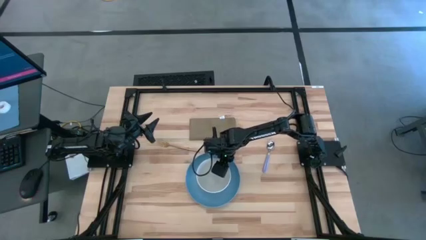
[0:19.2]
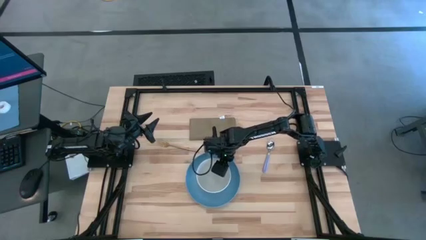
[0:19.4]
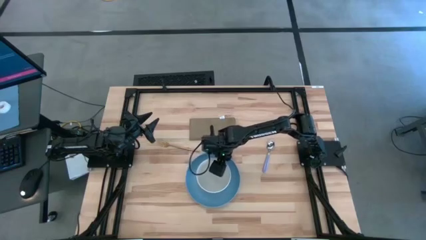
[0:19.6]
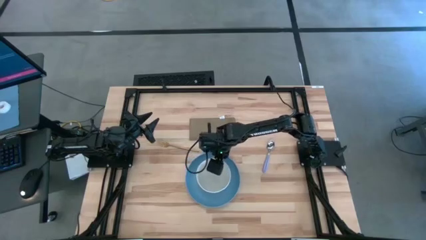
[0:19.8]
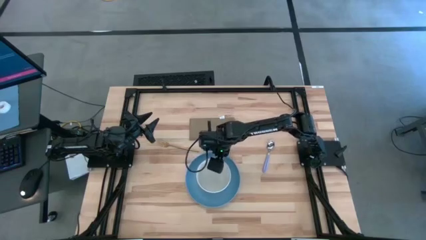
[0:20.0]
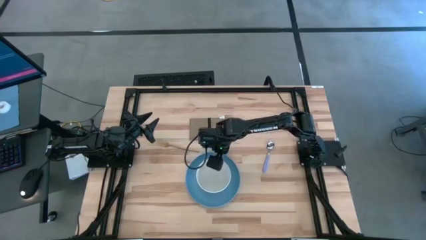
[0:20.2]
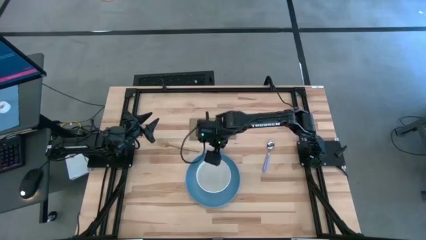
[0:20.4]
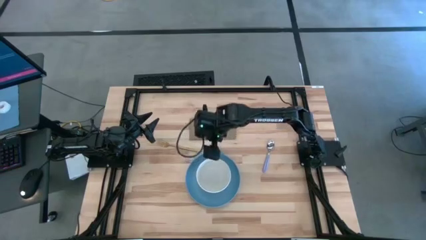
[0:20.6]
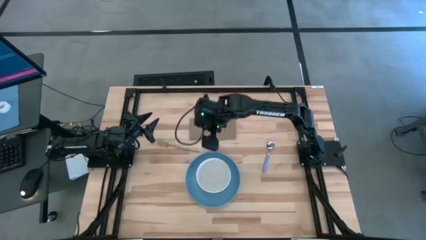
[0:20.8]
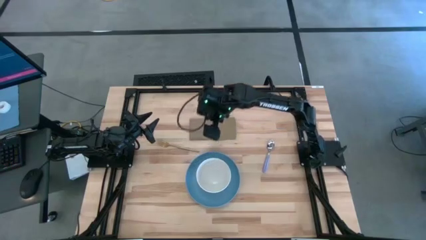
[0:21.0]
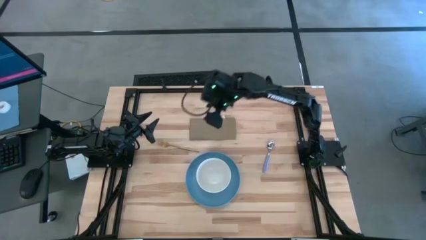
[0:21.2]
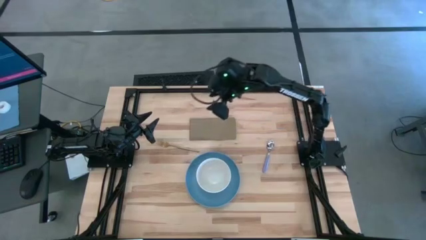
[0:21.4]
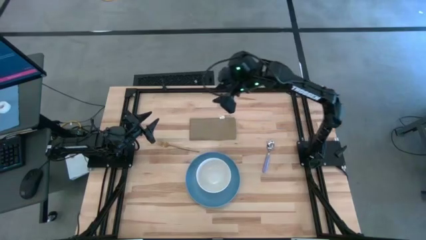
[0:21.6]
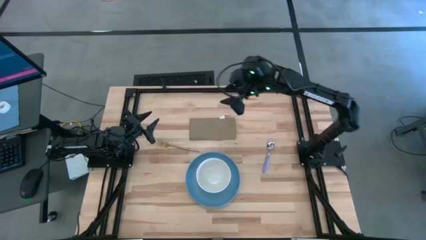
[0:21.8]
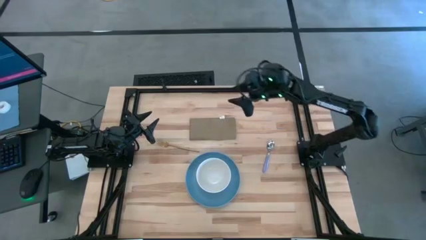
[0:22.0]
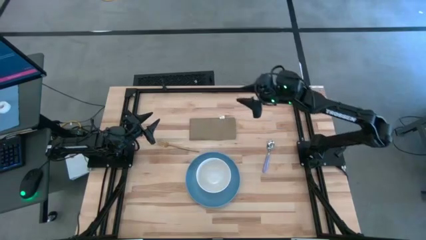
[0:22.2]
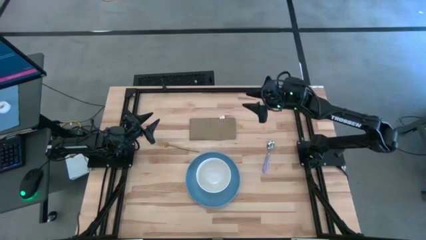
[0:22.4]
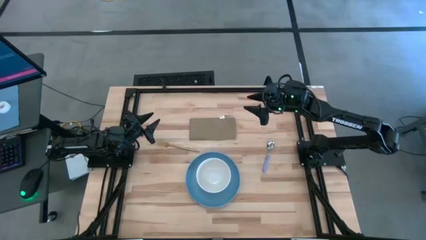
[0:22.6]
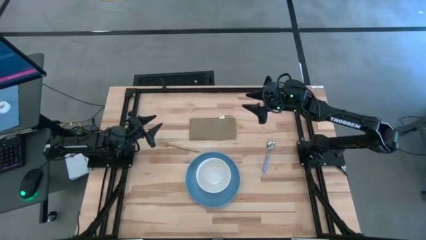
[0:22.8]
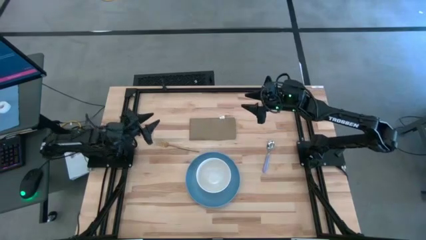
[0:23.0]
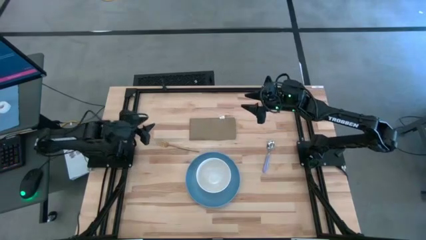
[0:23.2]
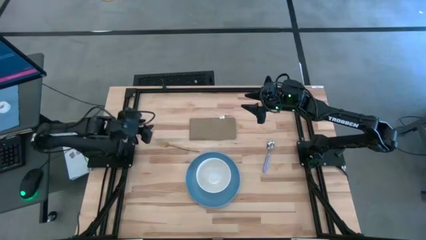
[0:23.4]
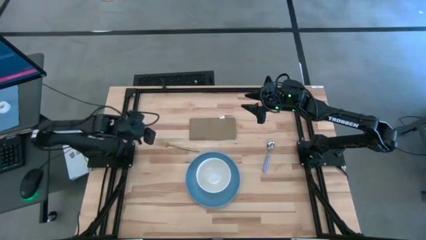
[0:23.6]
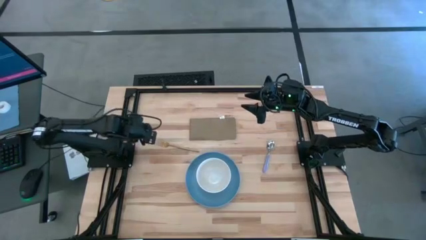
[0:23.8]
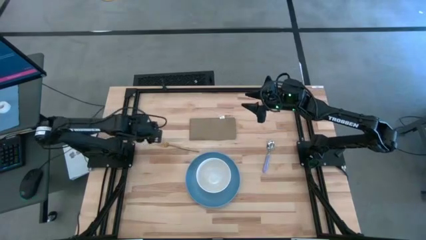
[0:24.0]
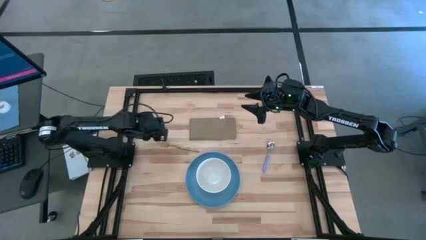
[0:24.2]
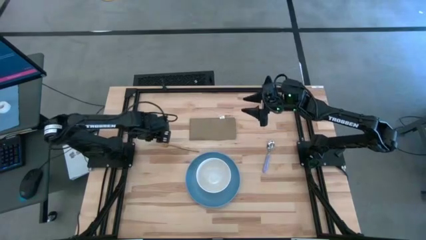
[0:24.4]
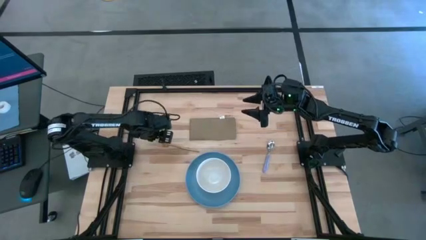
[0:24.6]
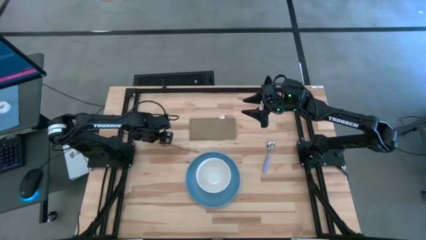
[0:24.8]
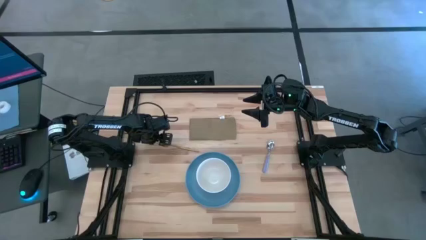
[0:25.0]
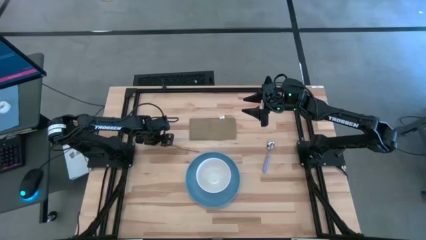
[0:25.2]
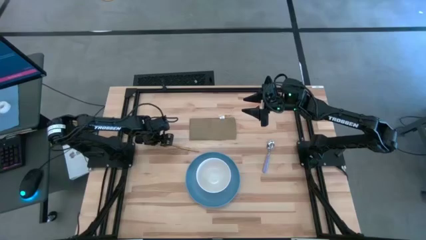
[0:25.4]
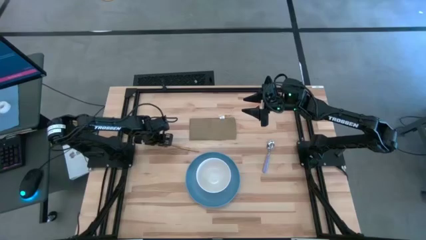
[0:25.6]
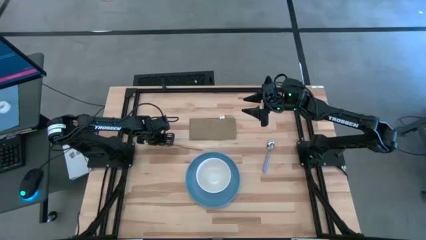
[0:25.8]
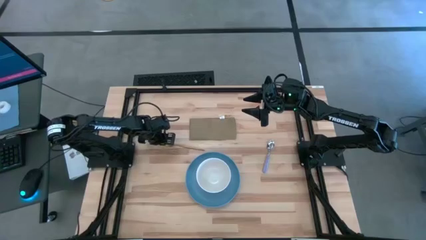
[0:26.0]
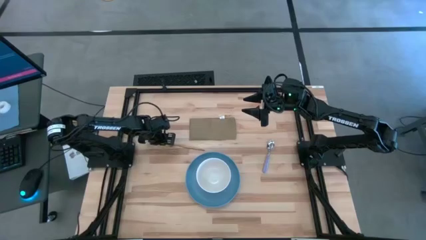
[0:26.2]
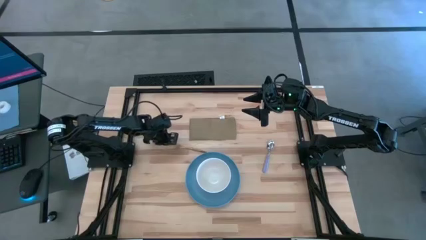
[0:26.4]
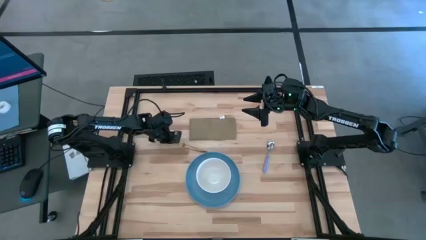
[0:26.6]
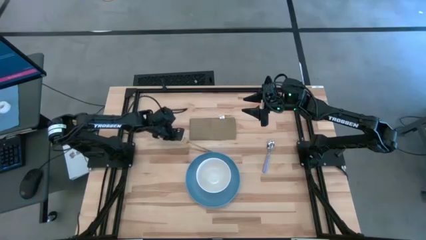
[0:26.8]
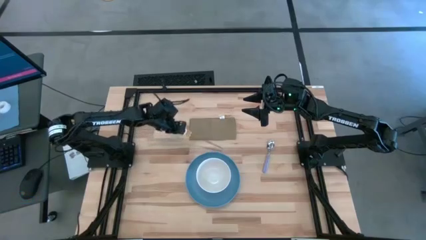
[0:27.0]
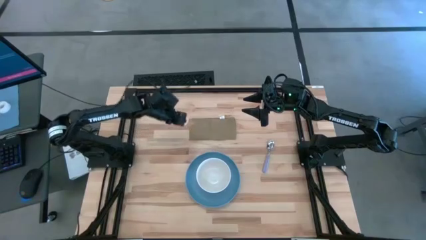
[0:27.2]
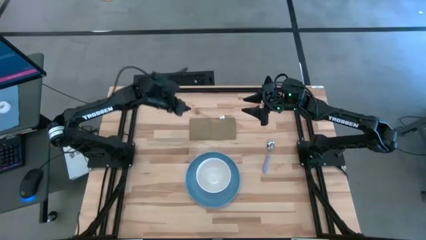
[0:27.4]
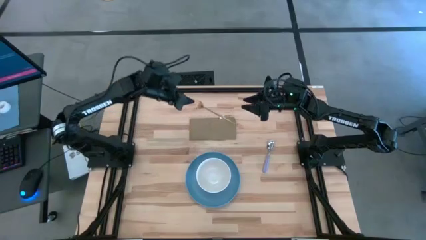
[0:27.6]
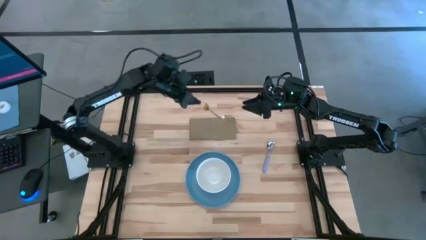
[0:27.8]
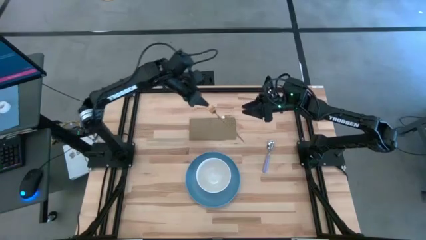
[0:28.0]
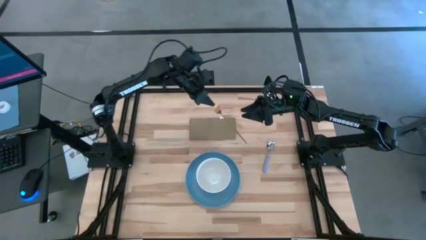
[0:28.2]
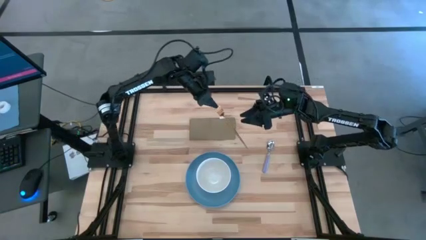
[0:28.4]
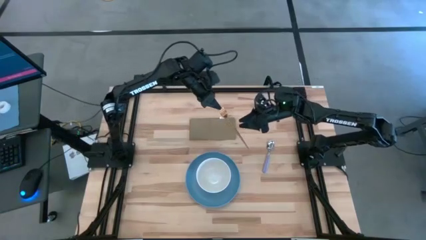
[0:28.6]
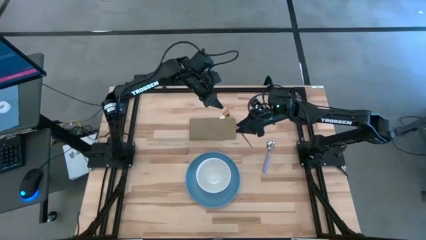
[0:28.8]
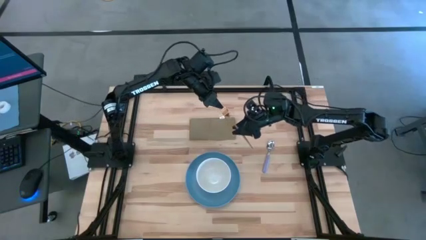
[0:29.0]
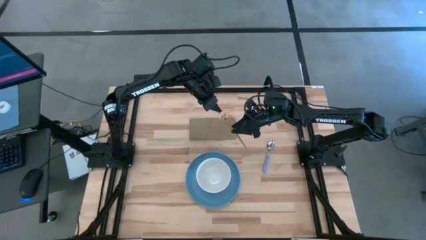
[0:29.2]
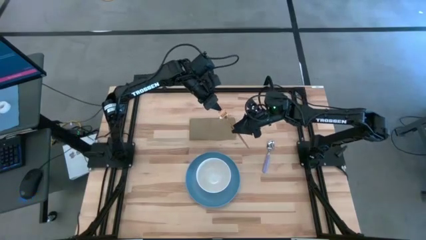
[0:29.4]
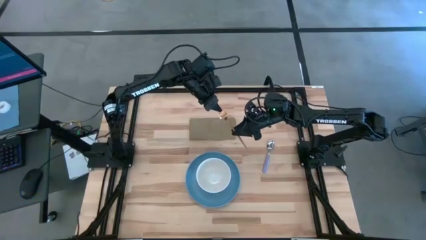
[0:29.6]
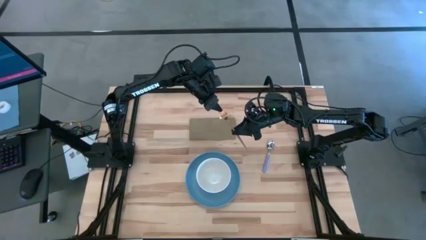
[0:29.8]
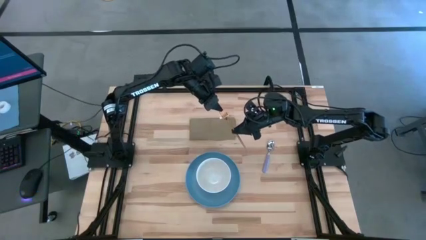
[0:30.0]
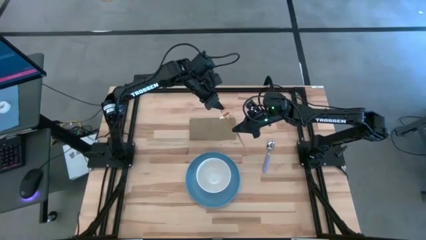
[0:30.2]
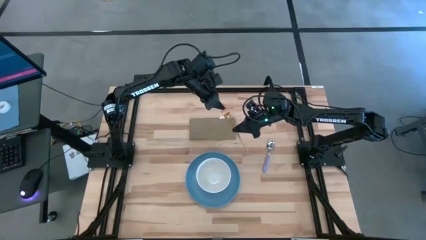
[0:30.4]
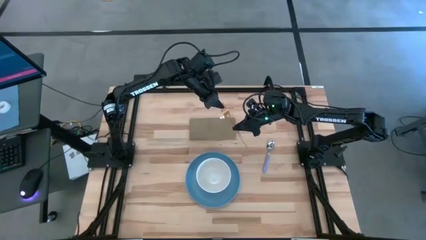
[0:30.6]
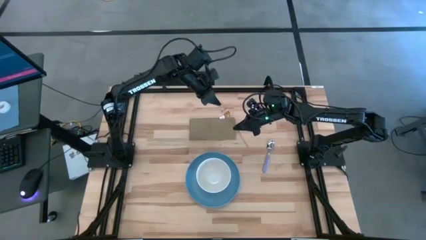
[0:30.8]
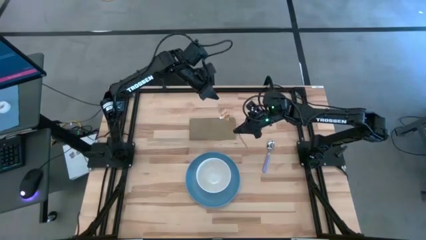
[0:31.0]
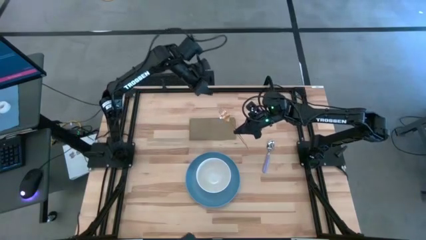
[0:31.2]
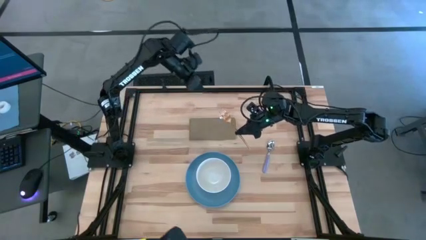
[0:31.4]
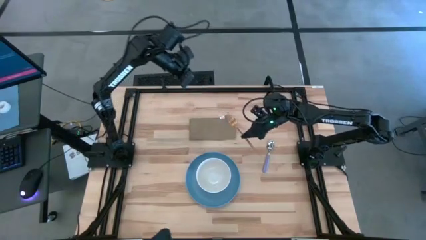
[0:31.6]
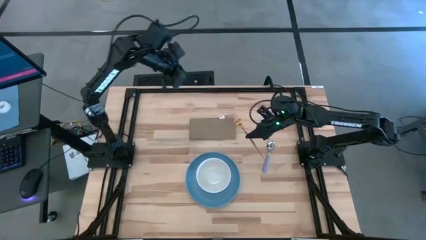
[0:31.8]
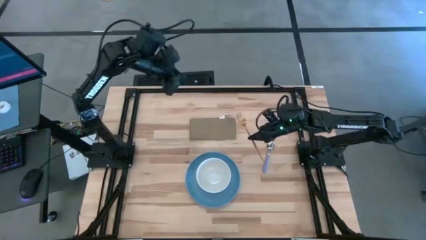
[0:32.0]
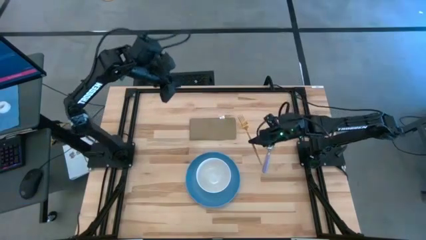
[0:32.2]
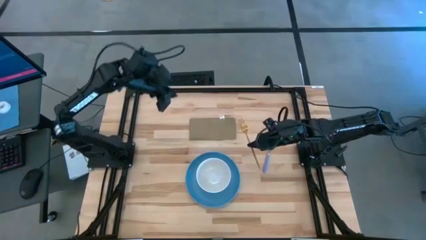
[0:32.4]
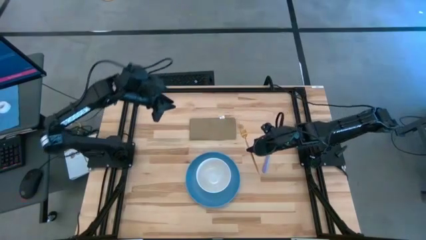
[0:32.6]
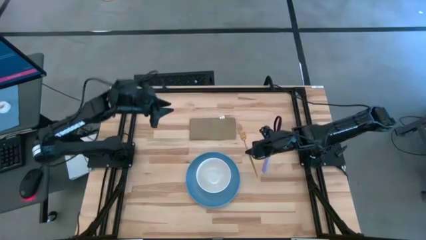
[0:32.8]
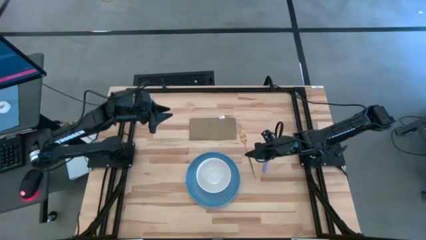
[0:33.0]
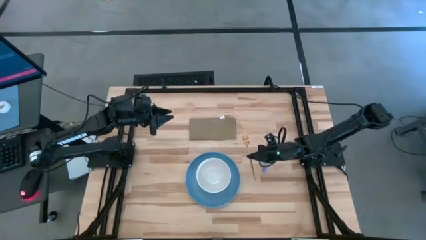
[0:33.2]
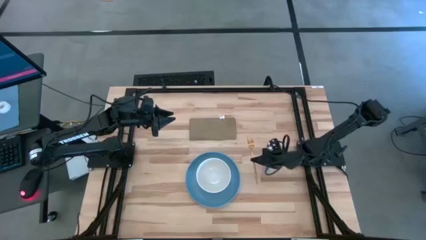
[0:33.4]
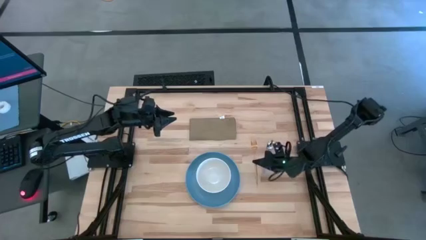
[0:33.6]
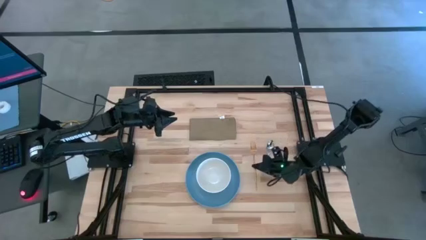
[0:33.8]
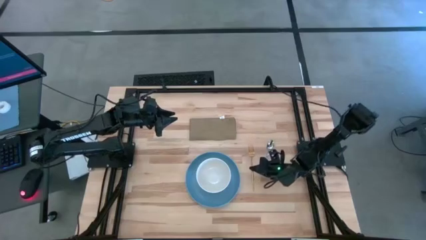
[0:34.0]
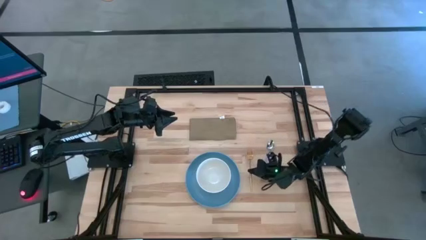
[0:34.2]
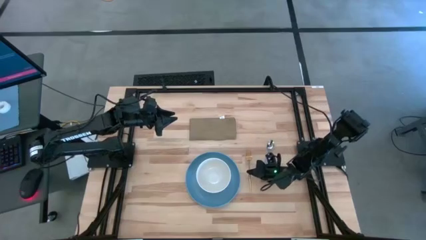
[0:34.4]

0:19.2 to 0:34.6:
Task: Set table place
Move the gold fork to the right of the blue plate

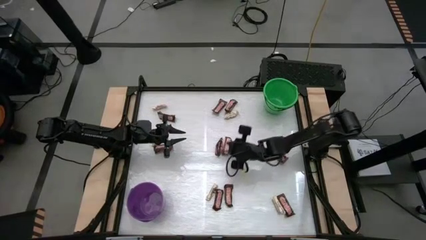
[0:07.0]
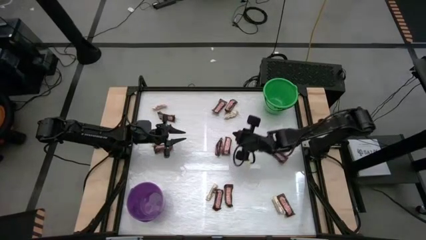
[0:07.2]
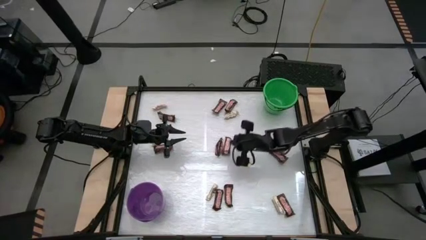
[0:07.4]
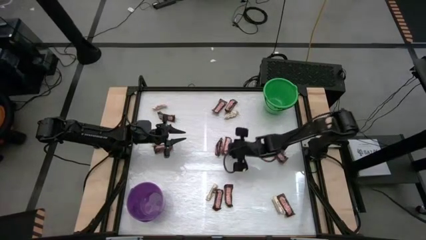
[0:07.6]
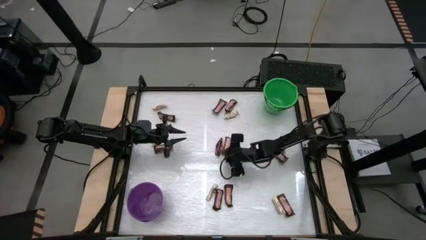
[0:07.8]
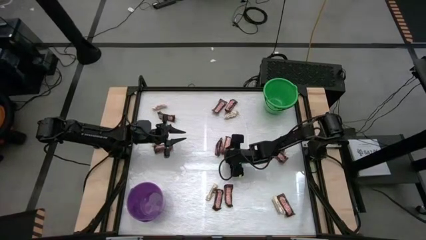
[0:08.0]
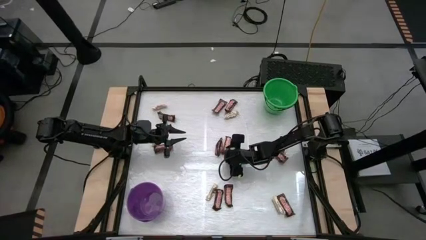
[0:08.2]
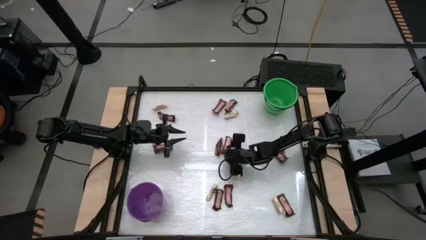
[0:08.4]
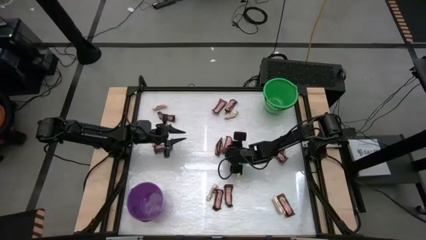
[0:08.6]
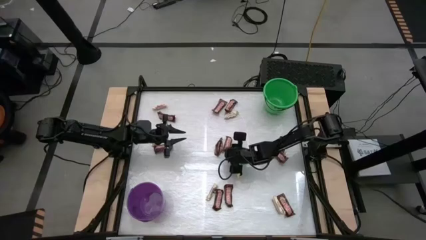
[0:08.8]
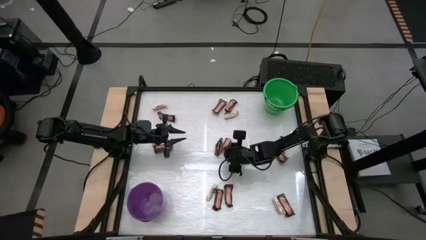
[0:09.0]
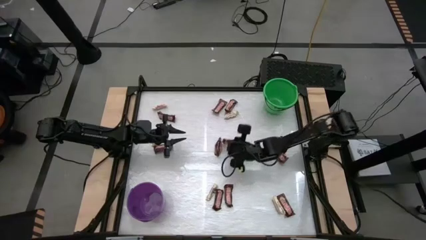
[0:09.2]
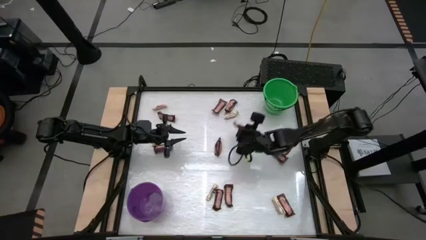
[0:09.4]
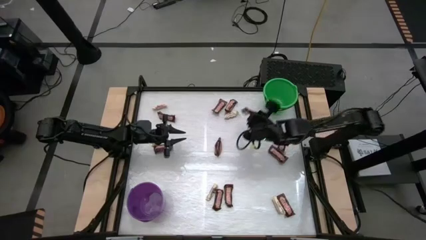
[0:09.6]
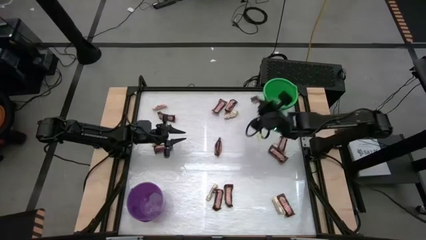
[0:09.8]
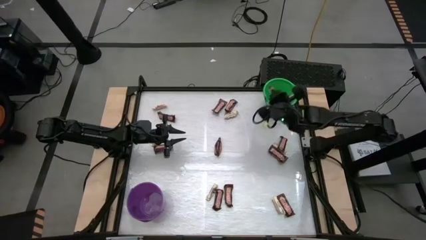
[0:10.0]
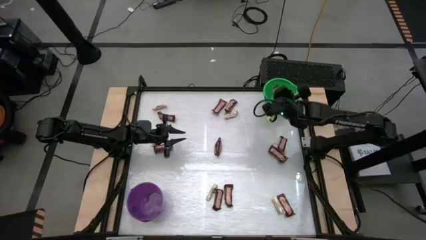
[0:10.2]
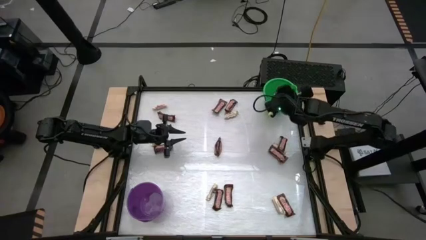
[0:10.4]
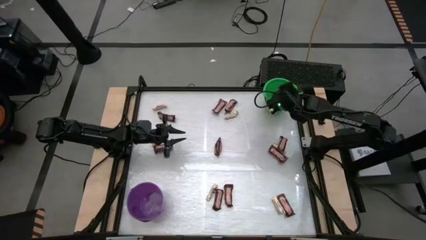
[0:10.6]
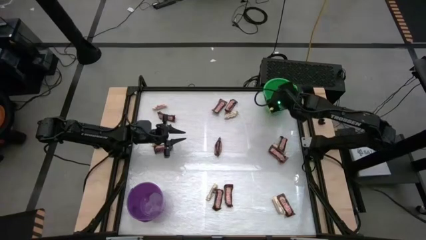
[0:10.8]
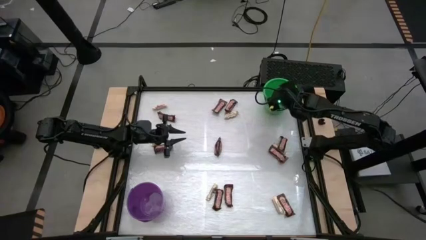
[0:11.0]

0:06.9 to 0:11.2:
Task: Sort candy by brand, put in halloween buckets
Put the brown candy bar into the green bucket
